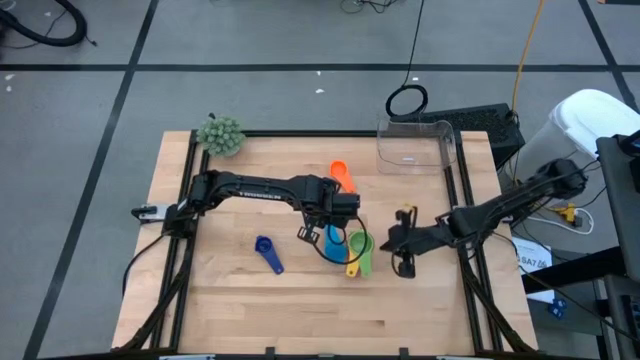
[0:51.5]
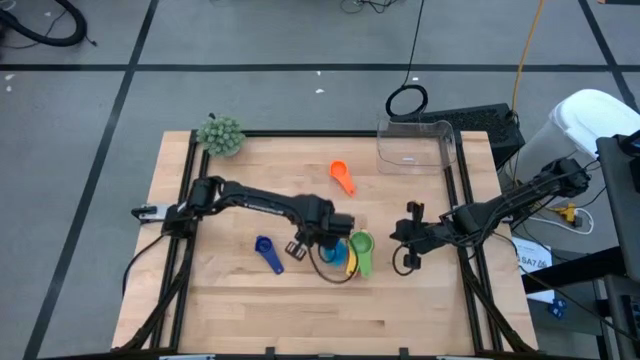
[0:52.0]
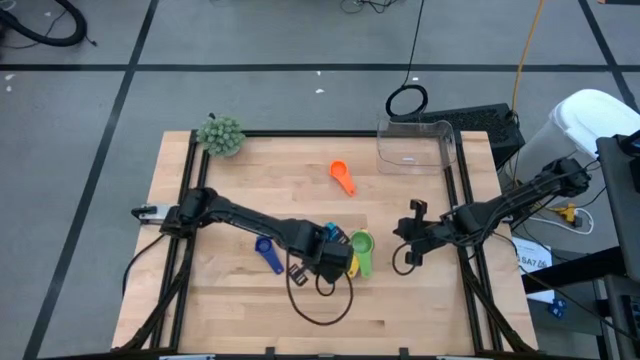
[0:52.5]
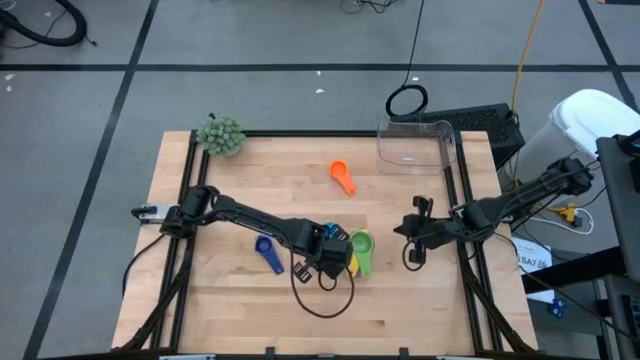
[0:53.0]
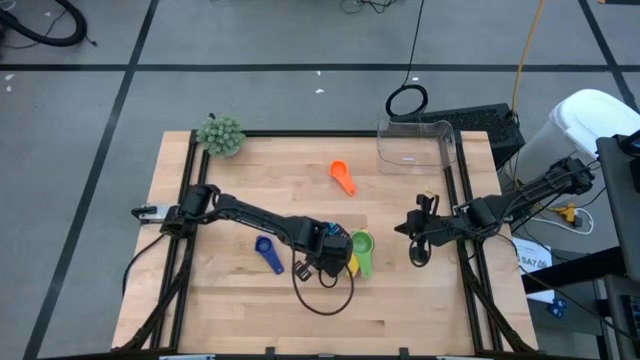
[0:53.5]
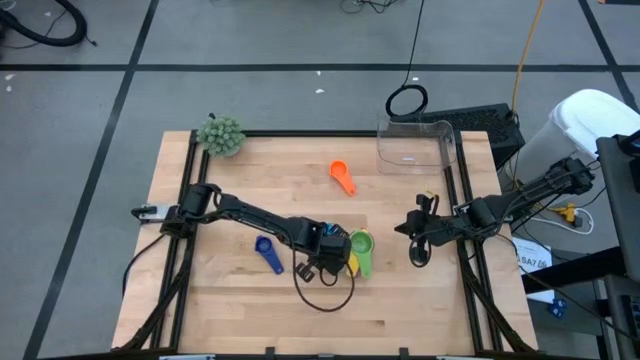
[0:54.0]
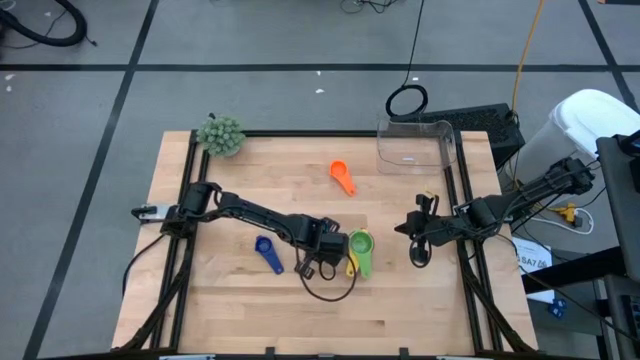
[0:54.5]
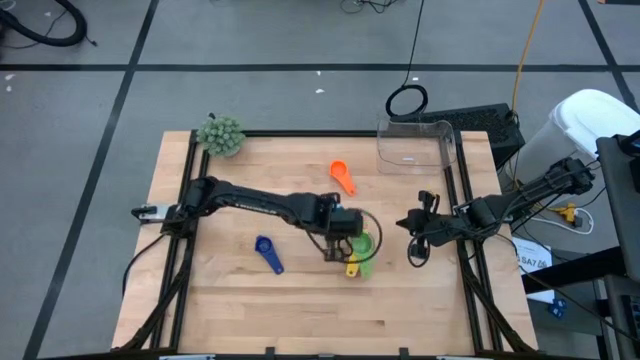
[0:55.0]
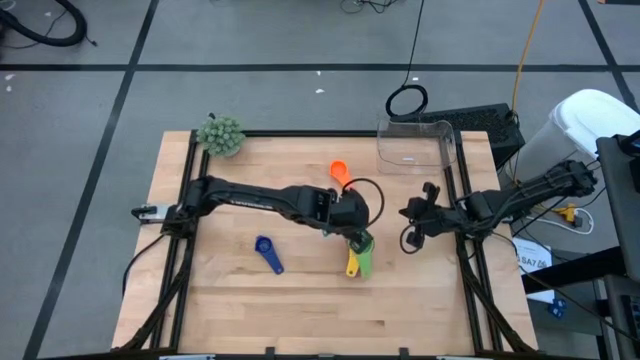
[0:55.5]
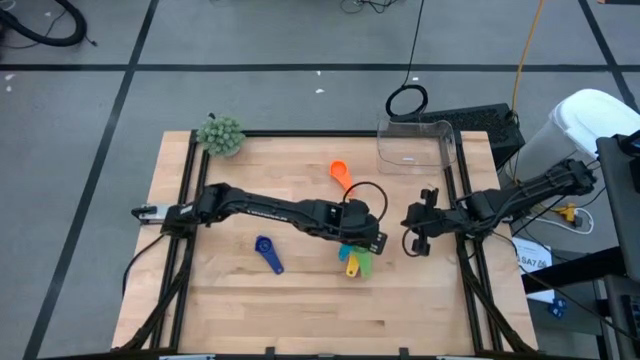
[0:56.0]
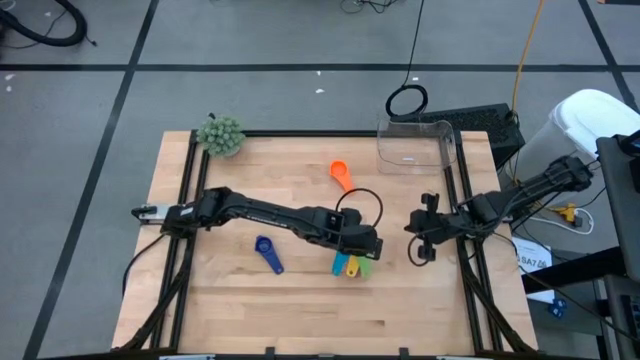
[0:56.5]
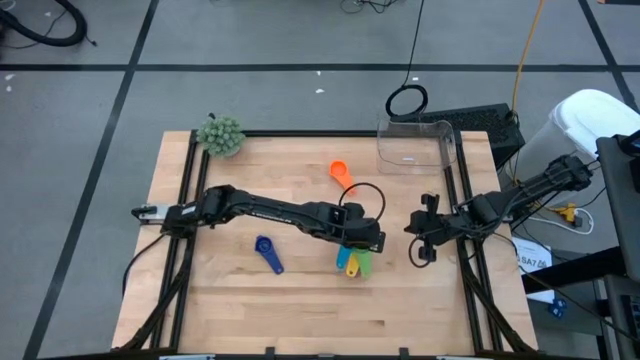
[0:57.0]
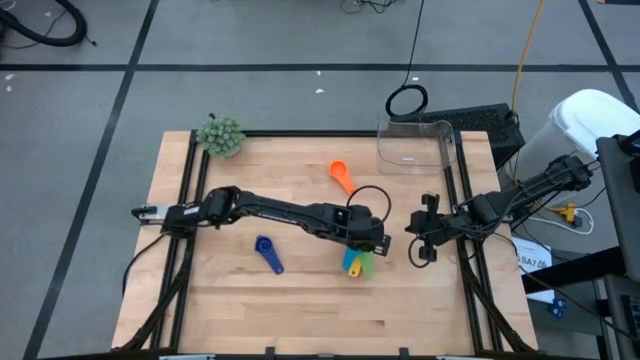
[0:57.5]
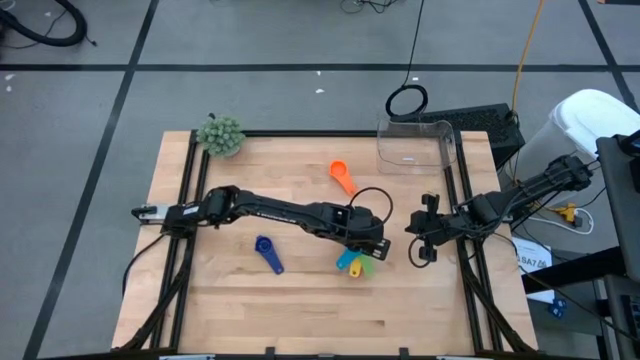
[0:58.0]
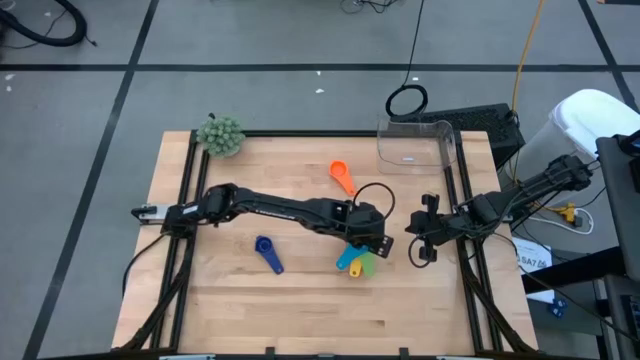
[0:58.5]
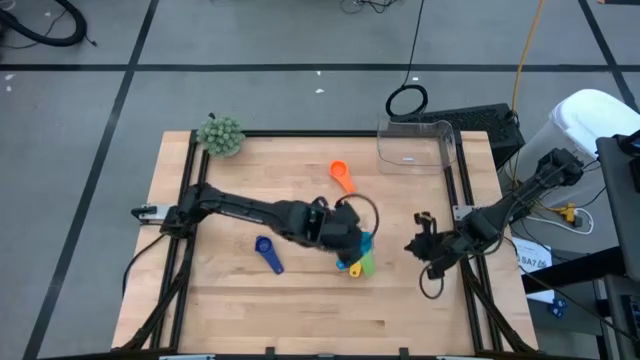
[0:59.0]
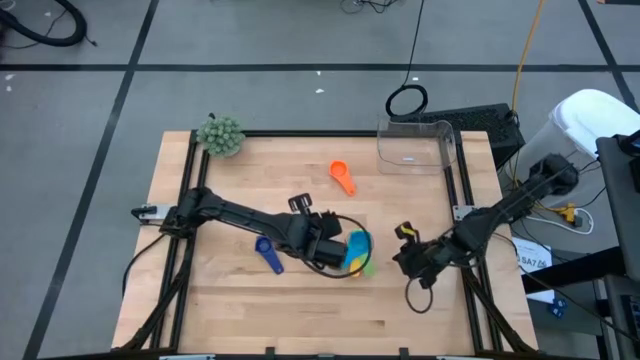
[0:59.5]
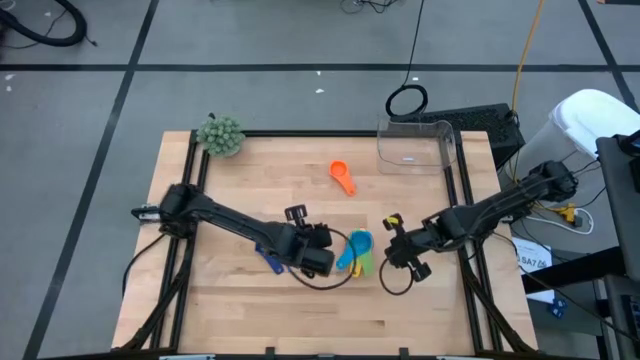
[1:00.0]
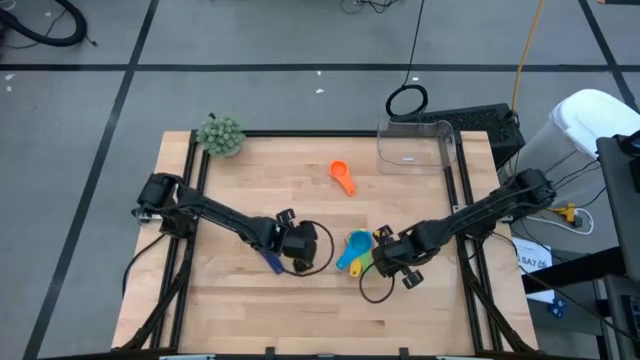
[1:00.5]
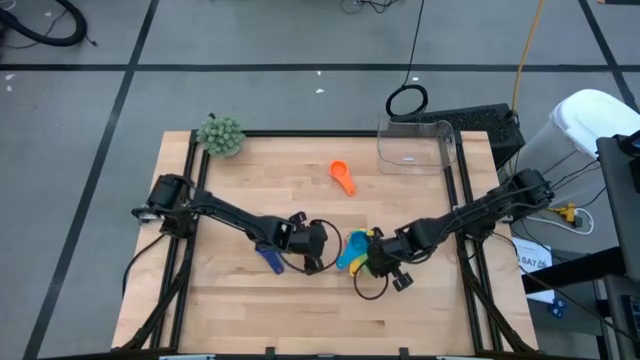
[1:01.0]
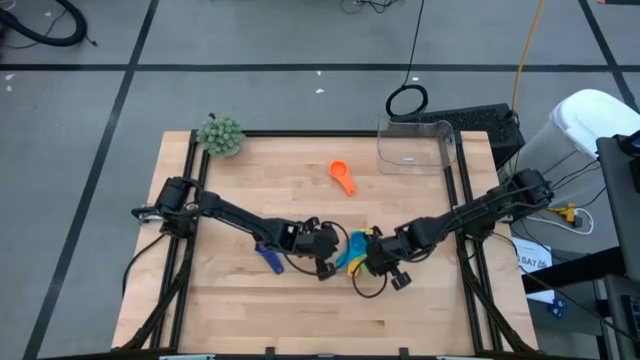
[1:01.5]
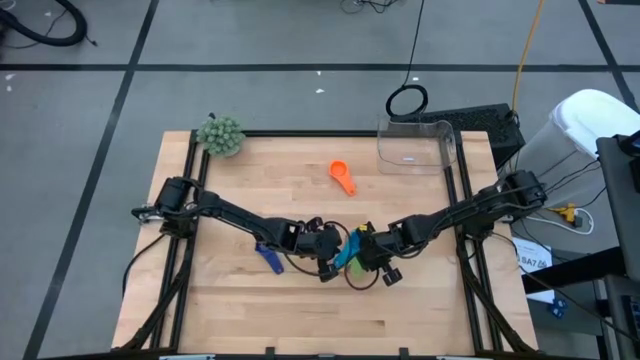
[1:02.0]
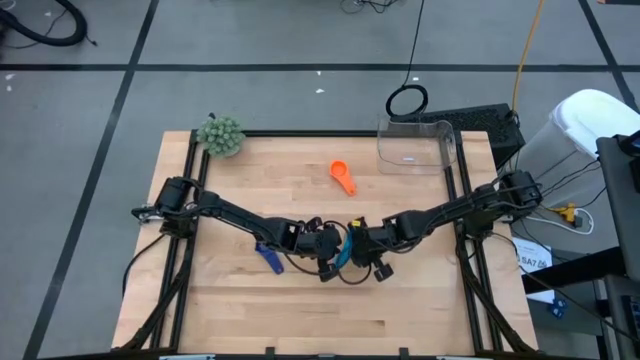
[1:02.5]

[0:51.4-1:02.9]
Task: Nest measuring cups in basket
Stack the light blue measuring cup on top of the green measuring cup

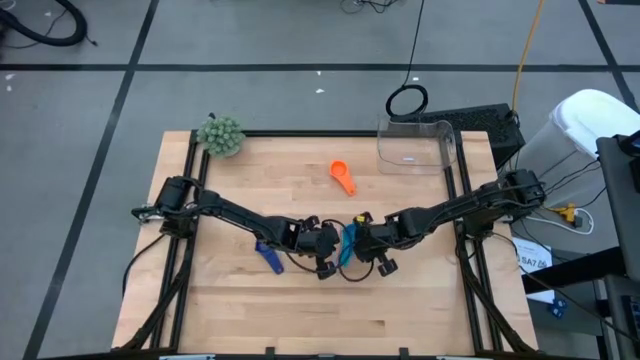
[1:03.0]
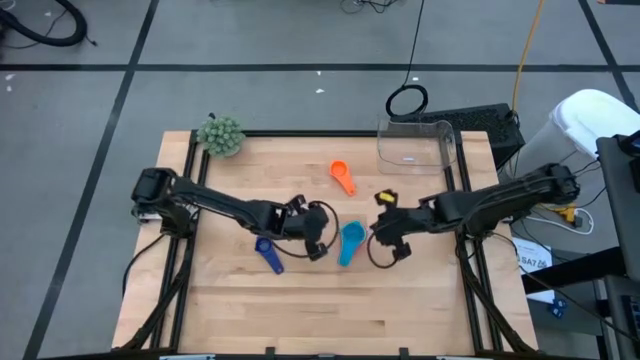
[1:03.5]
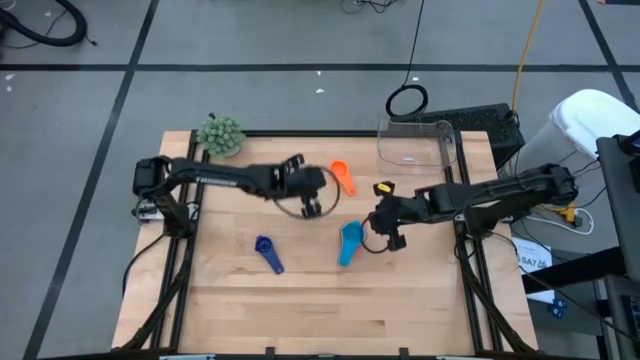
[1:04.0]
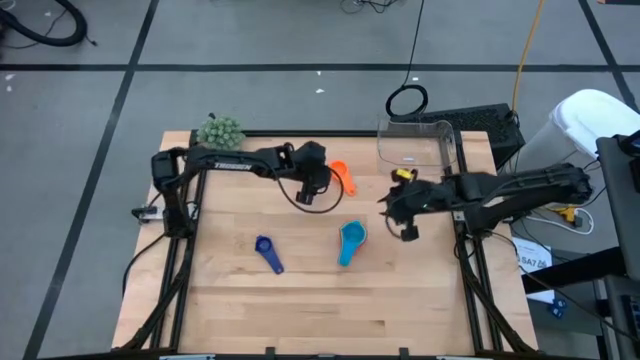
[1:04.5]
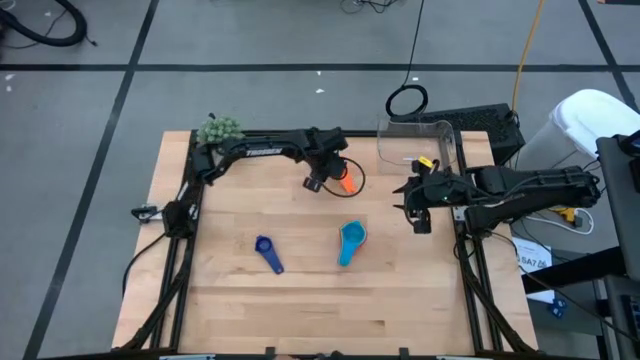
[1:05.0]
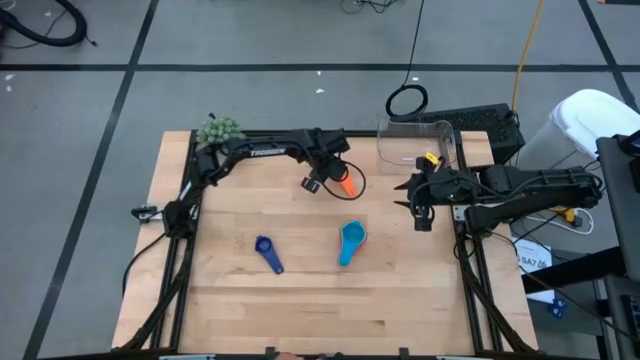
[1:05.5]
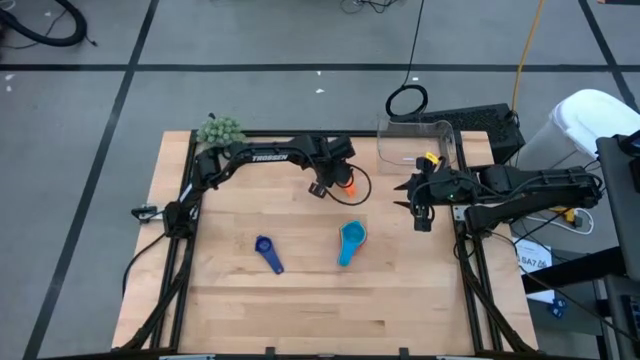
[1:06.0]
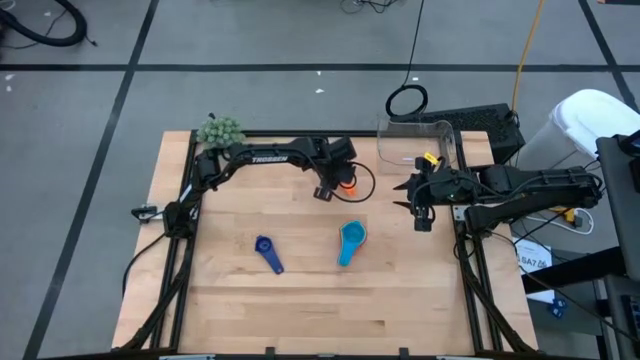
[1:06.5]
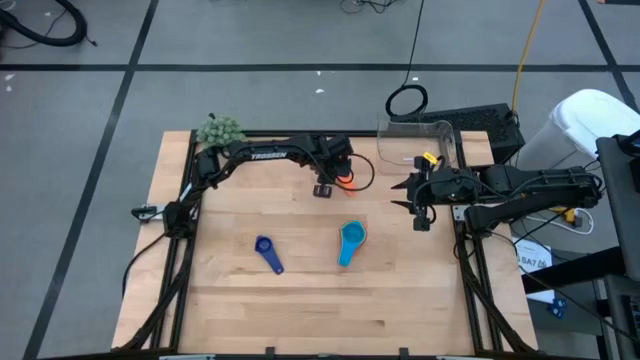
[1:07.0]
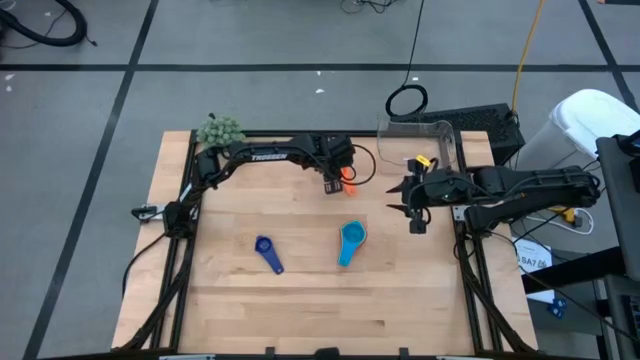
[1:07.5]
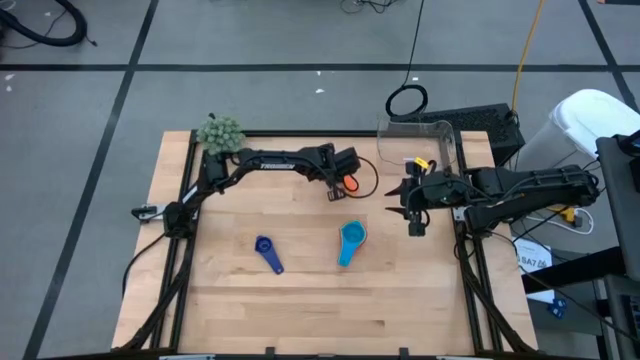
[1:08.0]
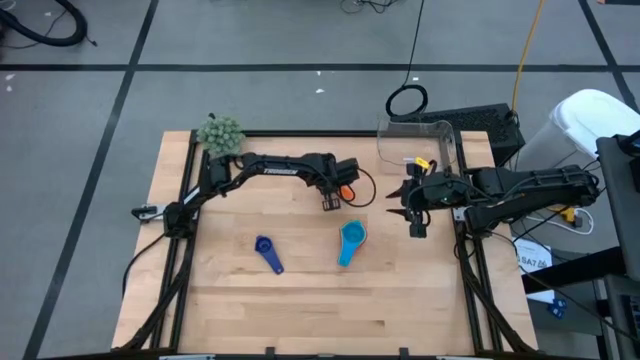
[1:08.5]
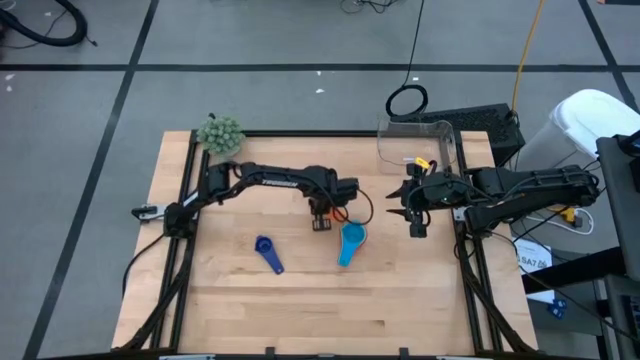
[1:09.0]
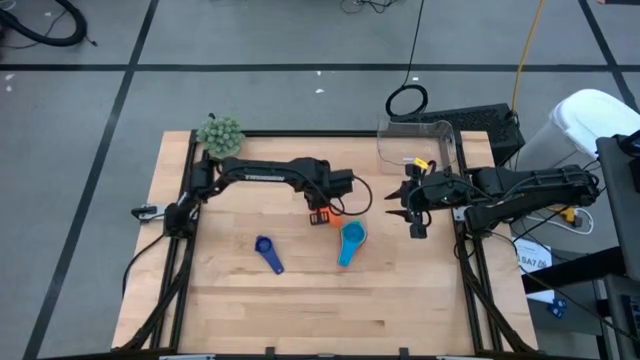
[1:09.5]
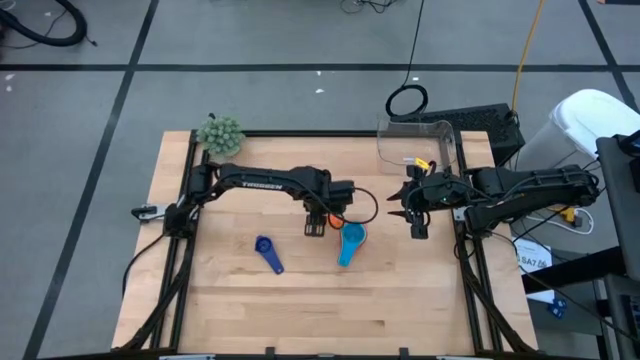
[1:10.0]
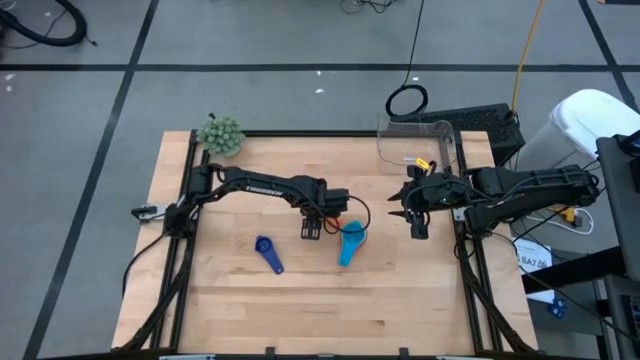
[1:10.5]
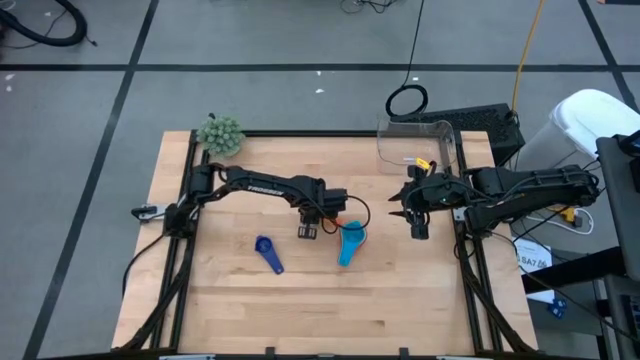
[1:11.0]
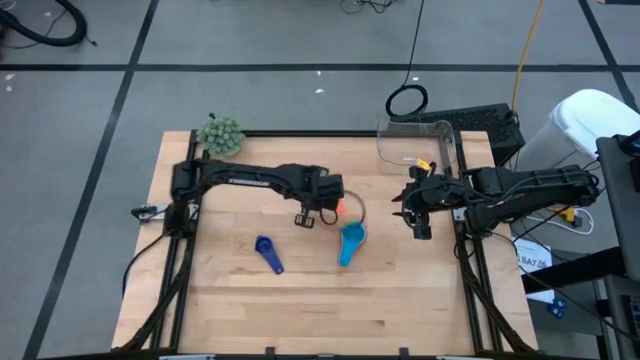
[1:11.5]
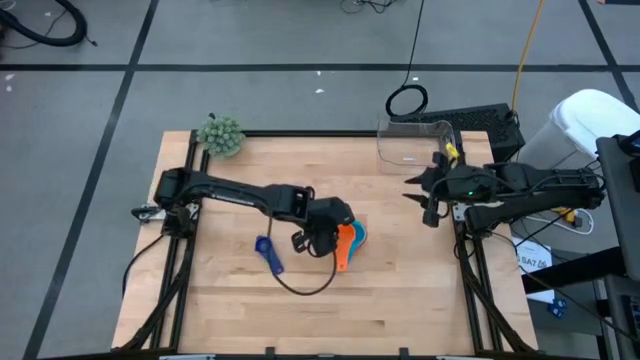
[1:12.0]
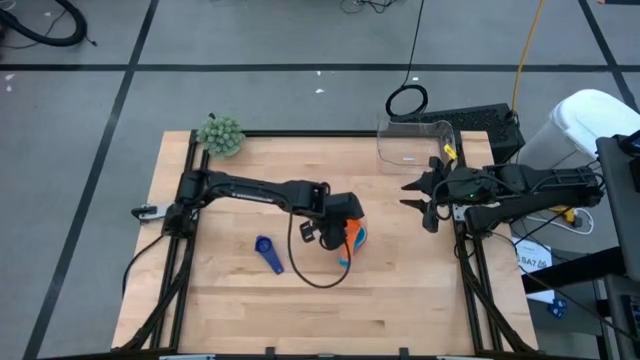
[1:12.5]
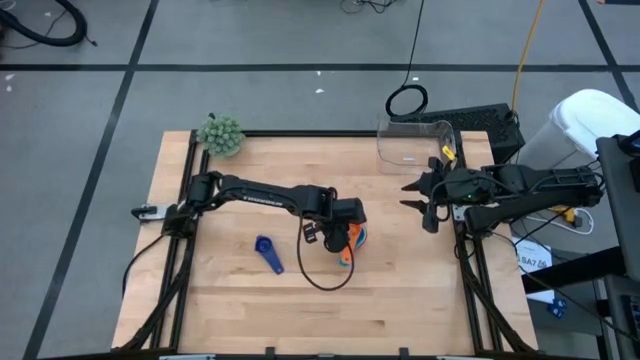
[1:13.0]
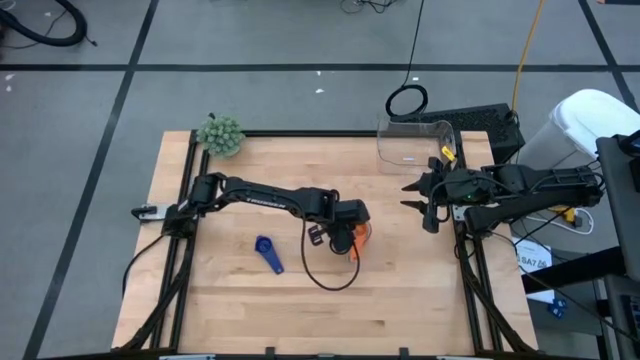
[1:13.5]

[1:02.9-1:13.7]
Stack the orange measuring cup on top of the light blue measuring cup
